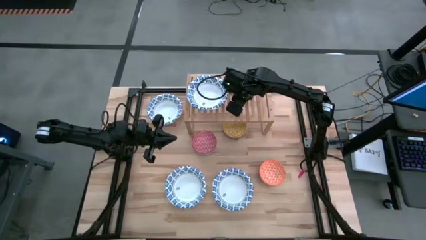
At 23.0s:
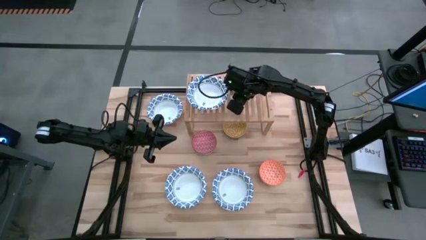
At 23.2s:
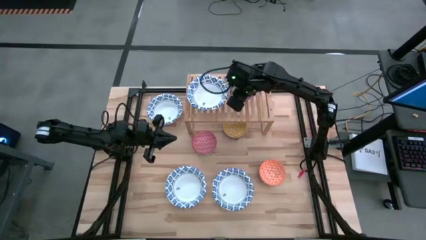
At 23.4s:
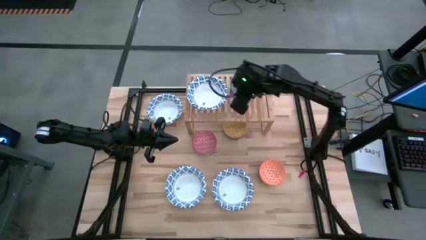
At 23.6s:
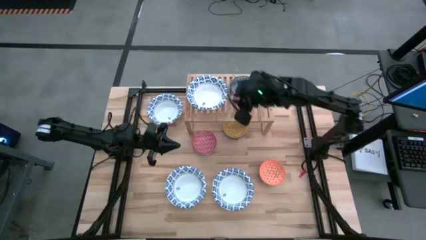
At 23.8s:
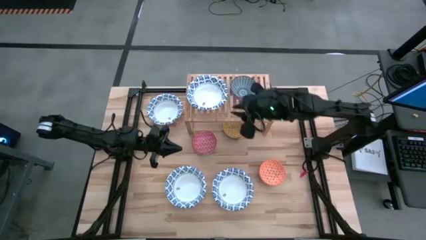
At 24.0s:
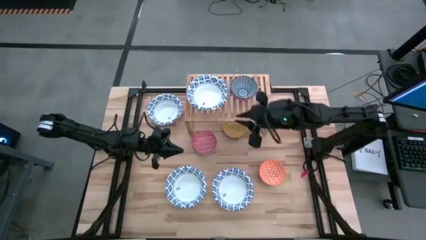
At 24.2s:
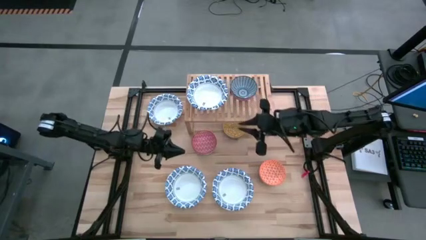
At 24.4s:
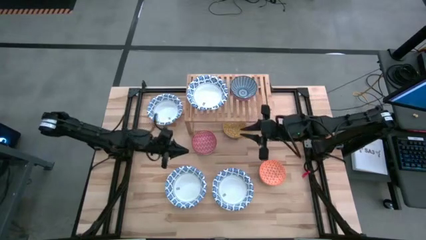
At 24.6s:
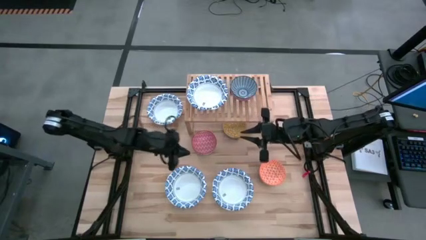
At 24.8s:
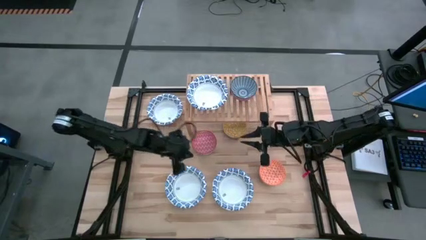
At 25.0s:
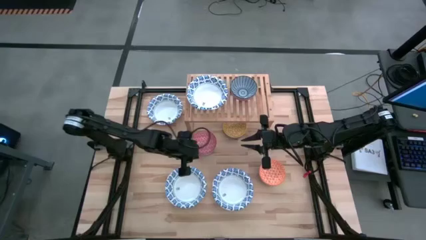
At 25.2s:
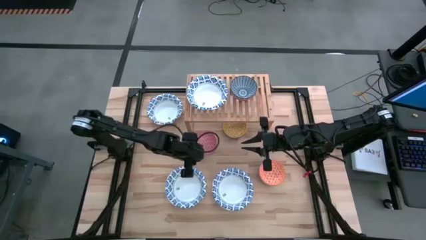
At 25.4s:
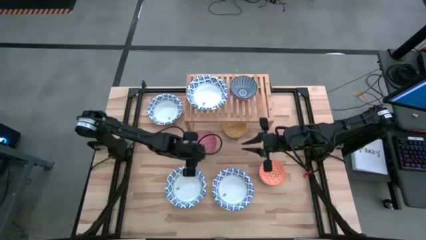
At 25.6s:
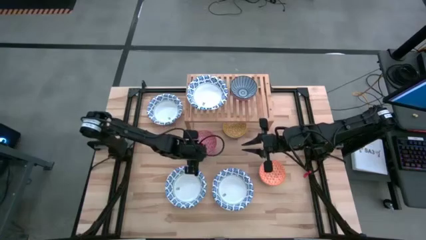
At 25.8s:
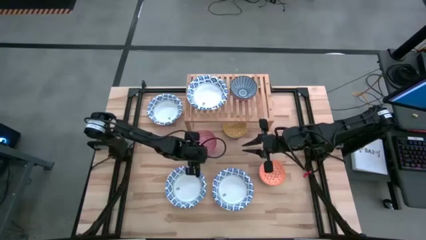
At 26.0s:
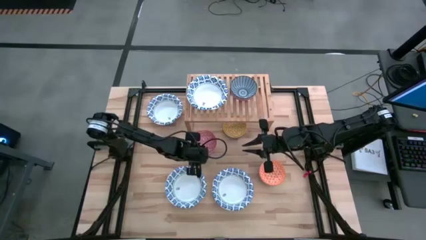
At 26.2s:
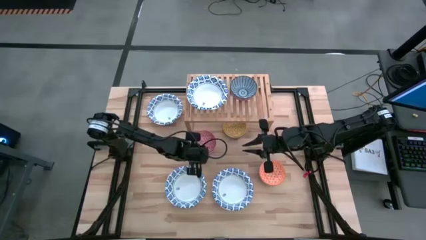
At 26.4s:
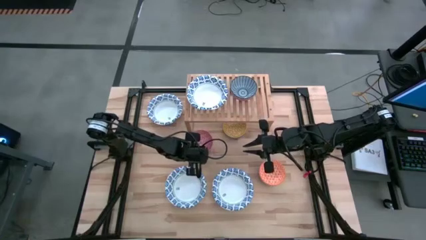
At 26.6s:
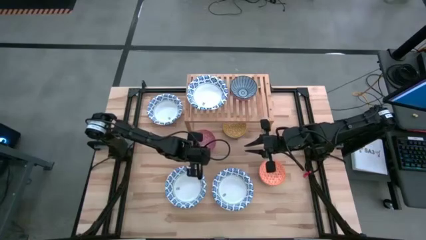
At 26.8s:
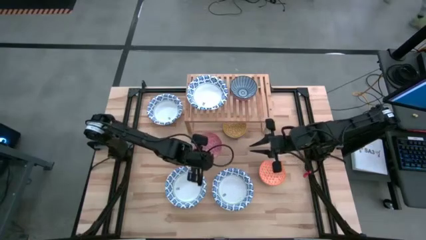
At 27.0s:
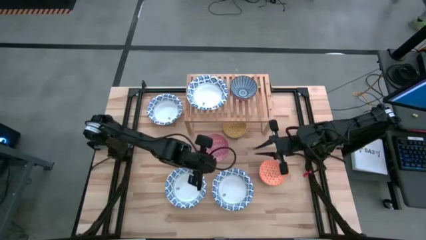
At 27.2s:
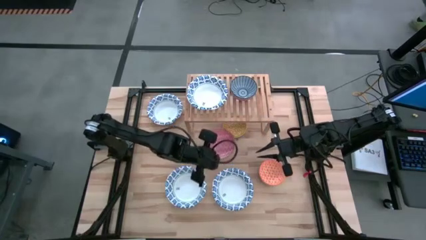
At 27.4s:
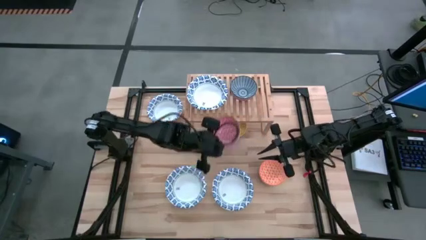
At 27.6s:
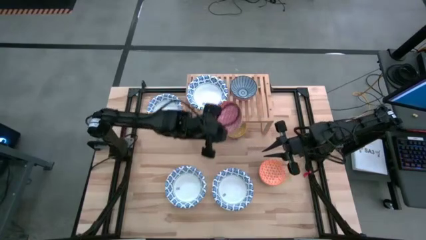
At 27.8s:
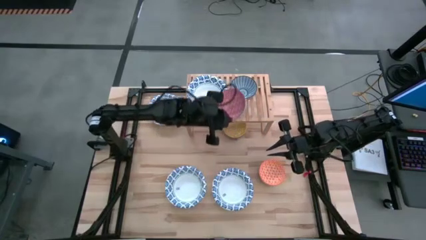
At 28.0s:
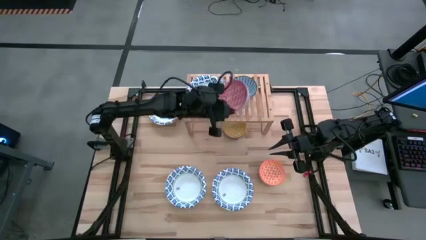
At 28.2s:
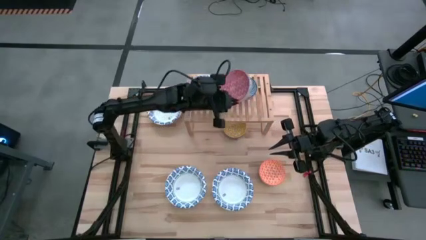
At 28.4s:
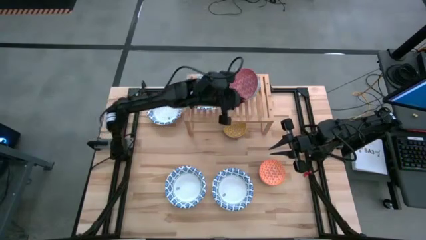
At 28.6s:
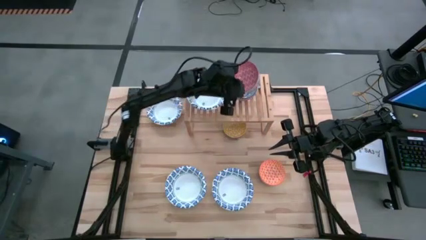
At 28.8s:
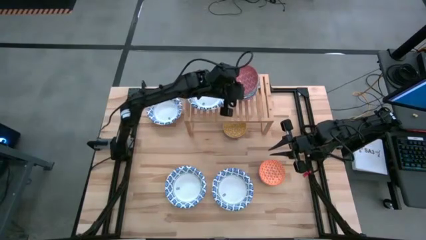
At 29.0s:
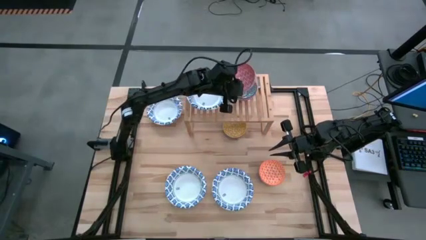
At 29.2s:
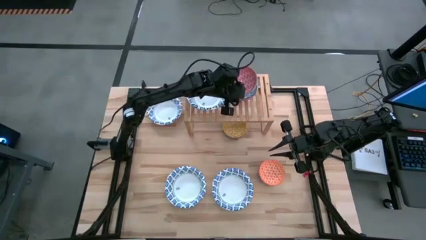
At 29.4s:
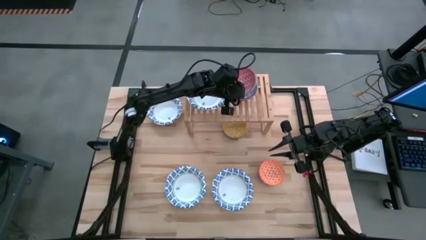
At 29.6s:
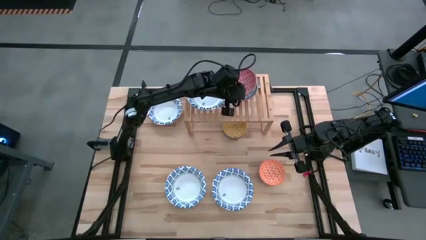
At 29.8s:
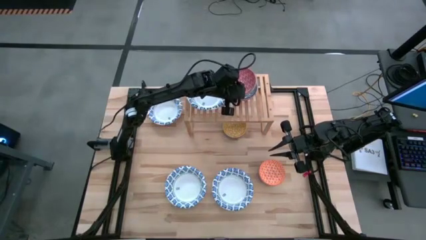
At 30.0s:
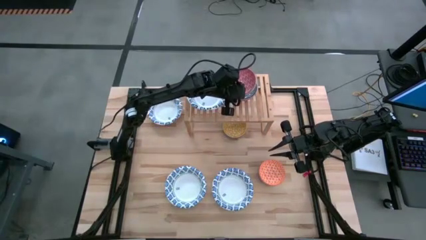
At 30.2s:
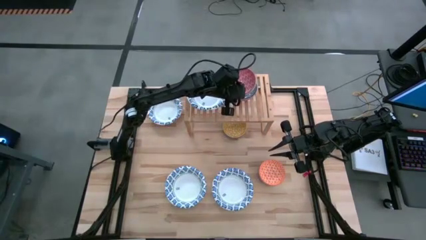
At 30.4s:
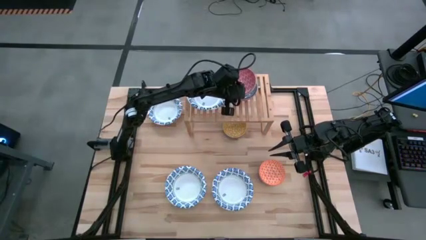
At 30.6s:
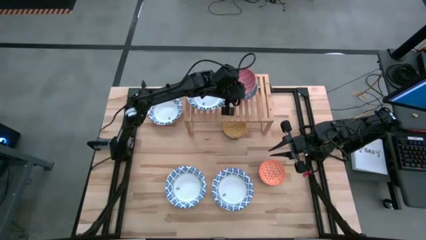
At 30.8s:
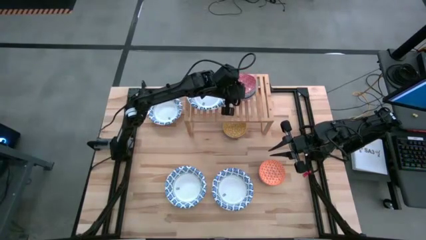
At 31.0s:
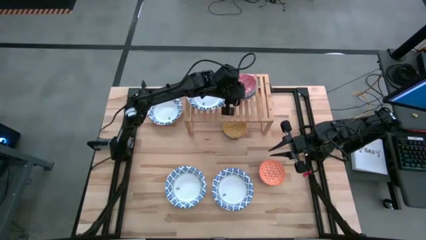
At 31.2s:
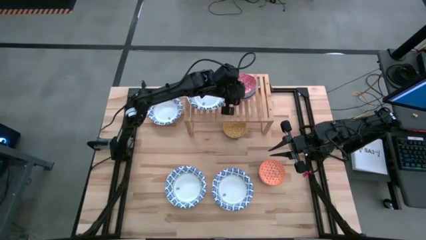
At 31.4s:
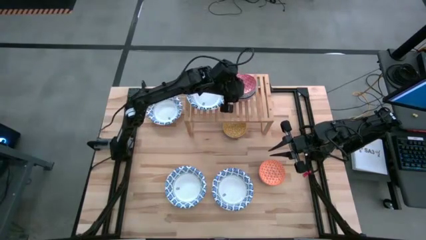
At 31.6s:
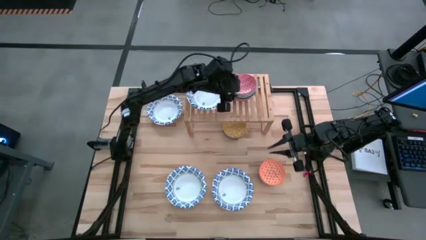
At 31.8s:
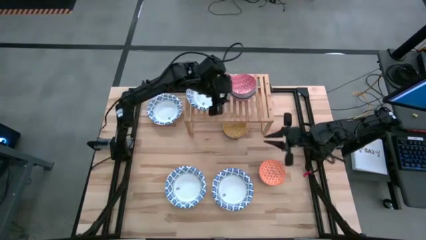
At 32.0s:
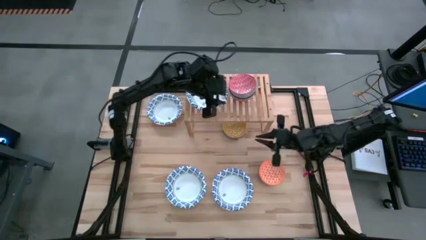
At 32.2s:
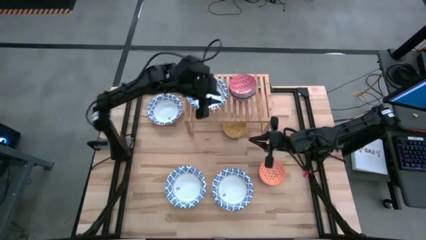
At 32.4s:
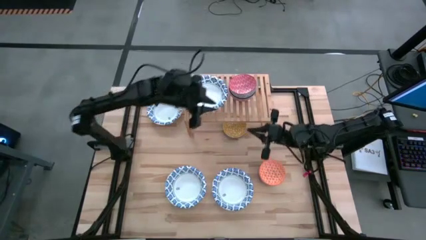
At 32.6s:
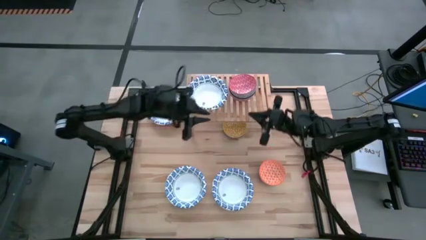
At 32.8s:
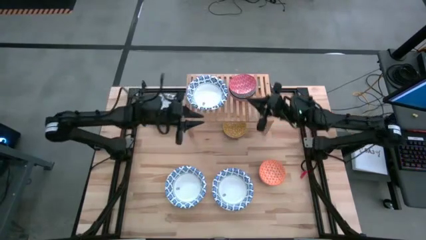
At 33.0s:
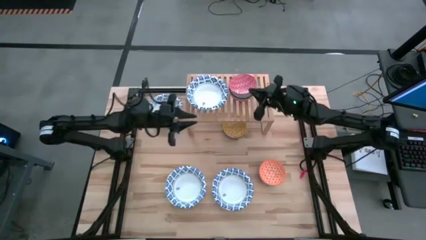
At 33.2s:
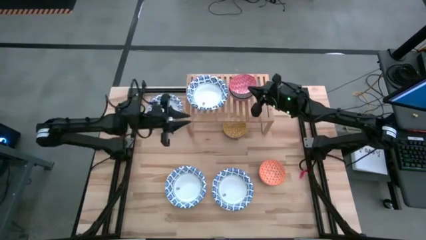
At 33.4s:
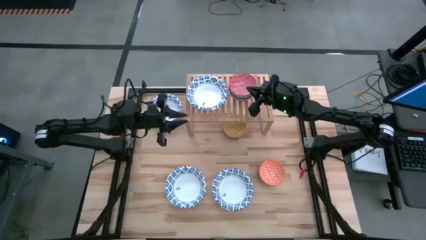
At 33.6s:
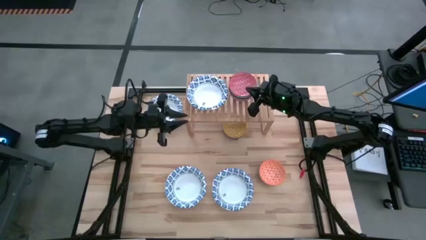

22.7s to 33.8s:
Task: Place and stack bowls onto a shelf
Stack the red bowl on top of the blue bowl on the shelf

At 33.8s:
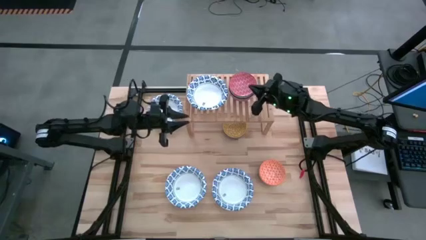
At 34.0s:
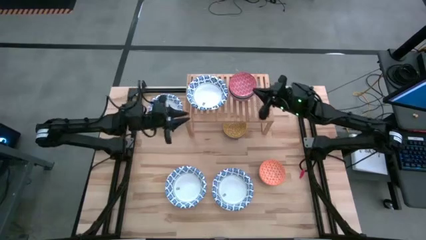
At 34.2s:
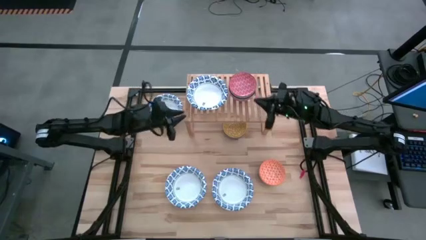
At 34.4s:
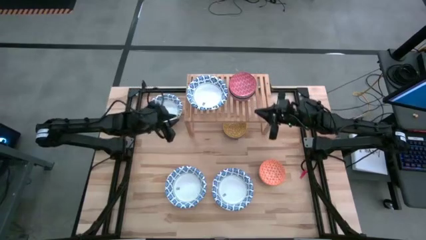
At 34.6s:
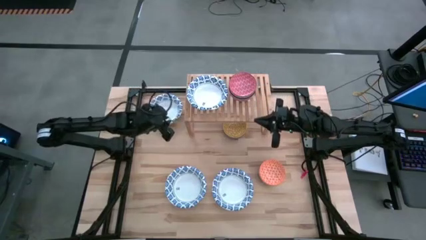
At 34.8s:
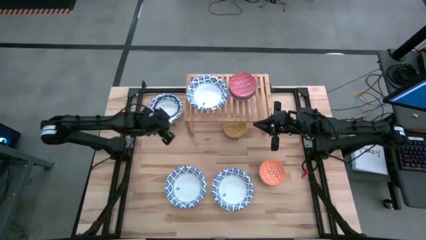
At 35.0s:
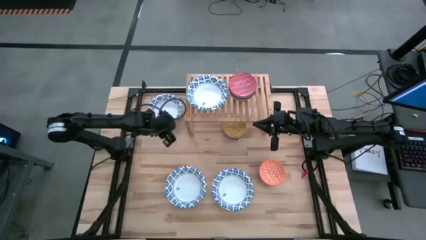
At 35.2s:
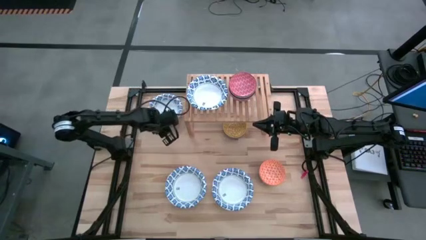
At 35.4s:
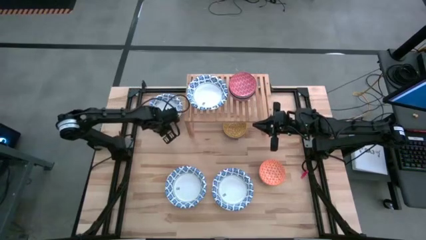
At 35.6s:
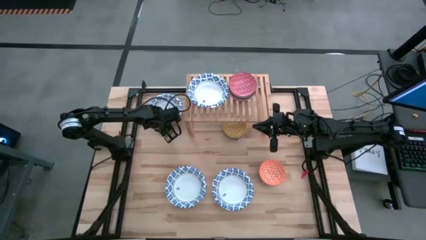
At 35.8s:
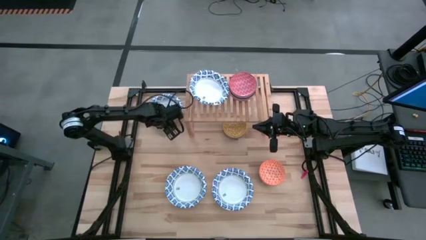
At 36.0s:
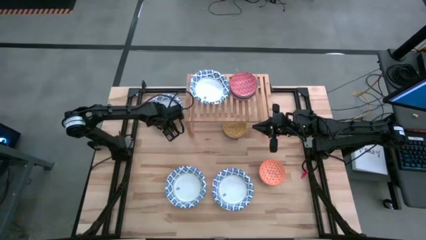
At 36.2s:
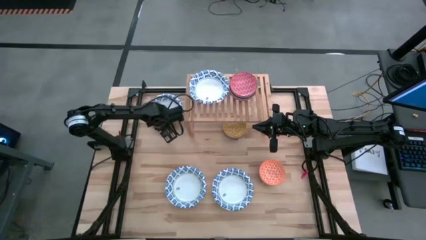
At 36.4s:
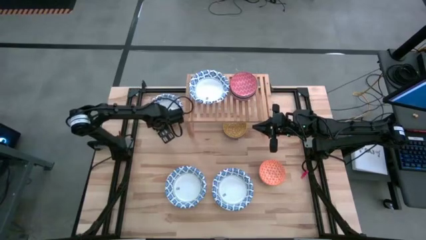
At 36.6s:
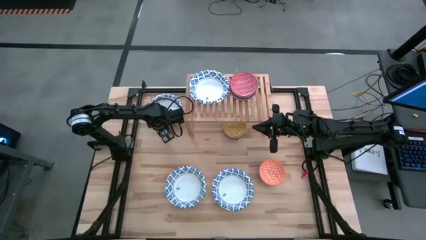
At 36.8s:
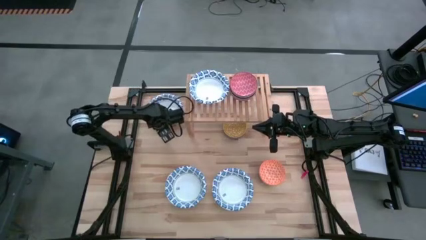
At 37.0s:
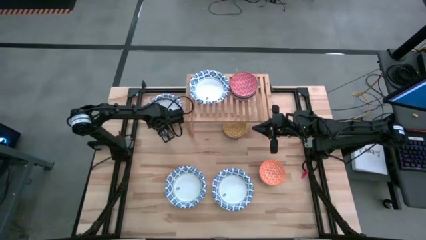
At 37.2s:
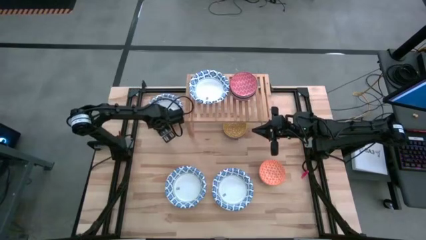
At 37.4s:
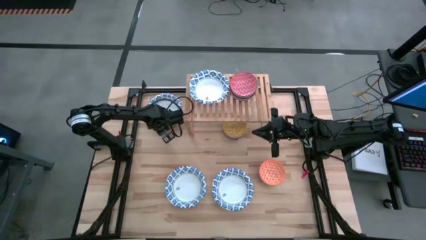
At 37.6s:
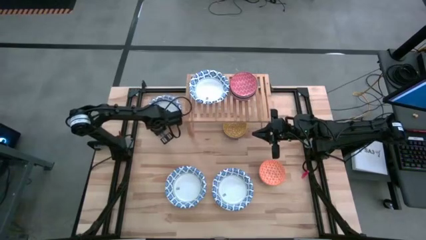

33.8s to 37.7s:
Stack the top left white bowl on top of the white bowl on the shelf
